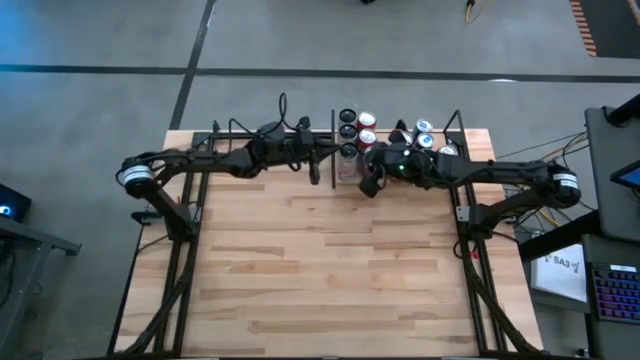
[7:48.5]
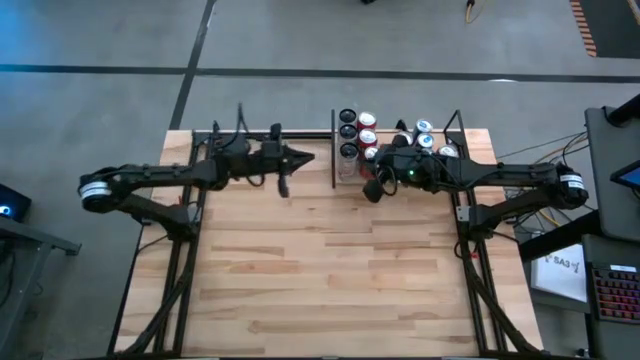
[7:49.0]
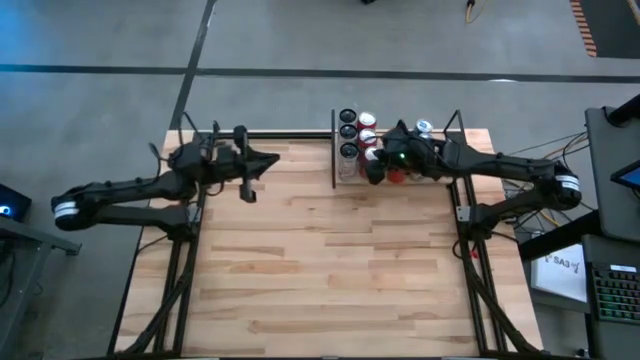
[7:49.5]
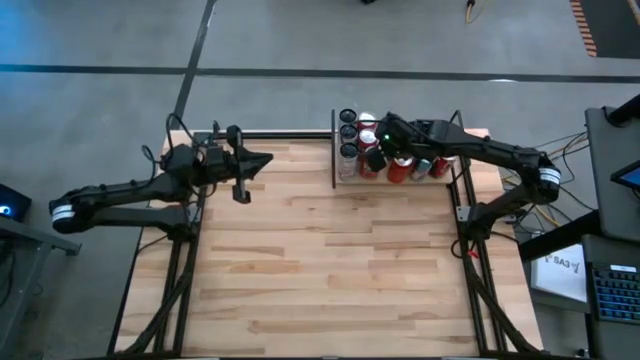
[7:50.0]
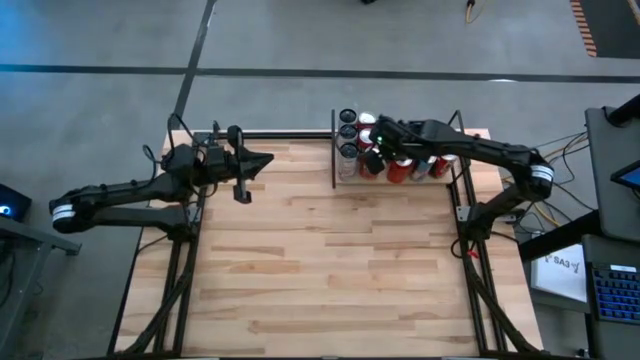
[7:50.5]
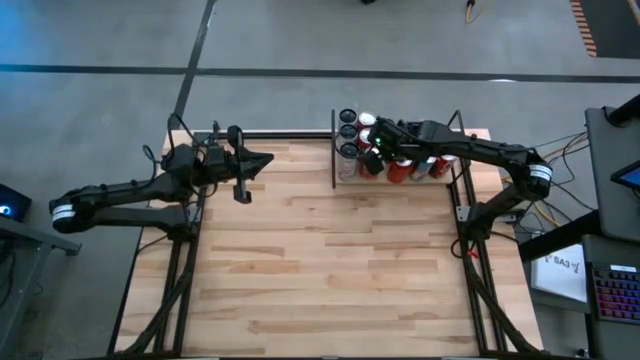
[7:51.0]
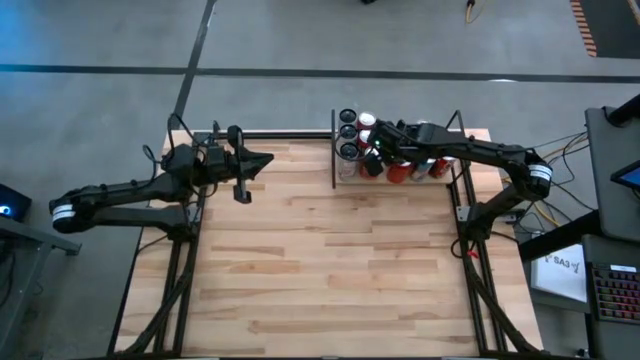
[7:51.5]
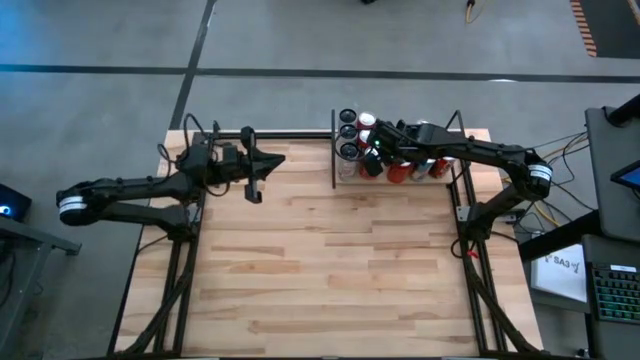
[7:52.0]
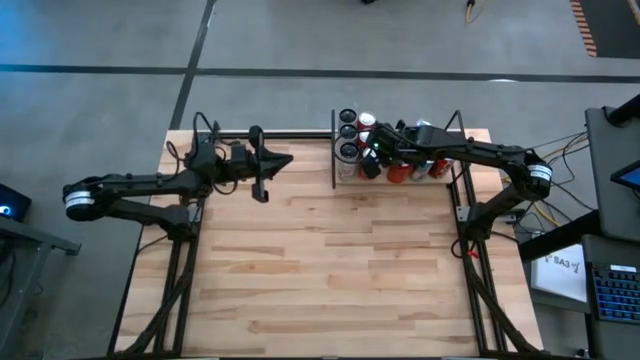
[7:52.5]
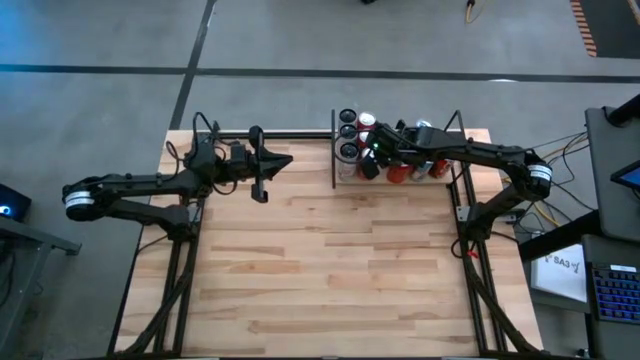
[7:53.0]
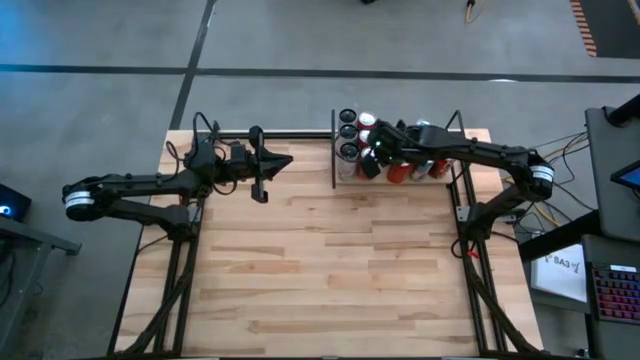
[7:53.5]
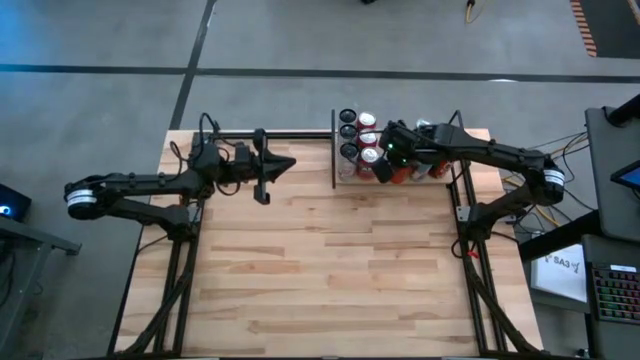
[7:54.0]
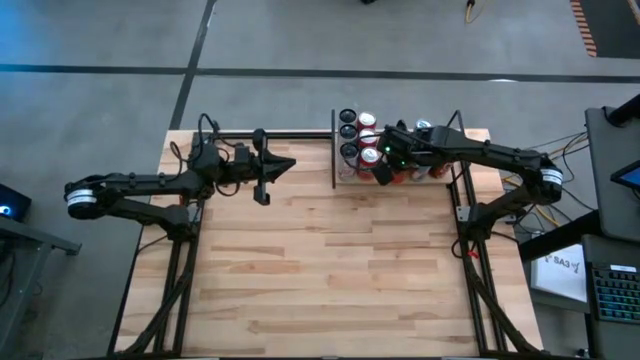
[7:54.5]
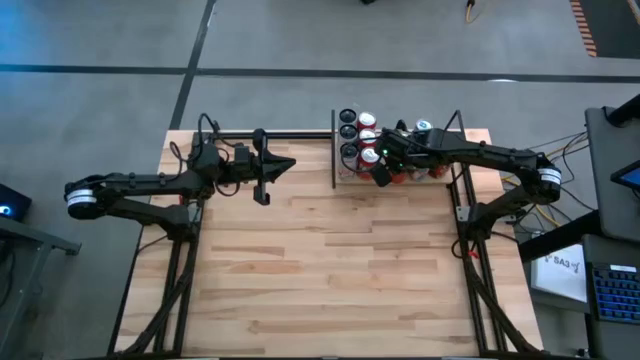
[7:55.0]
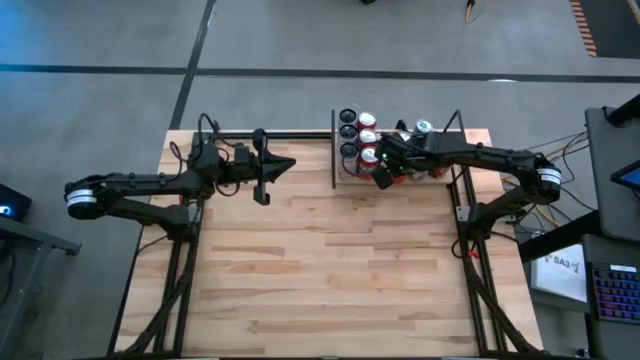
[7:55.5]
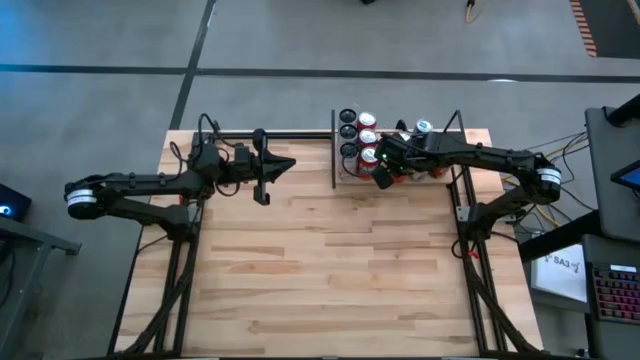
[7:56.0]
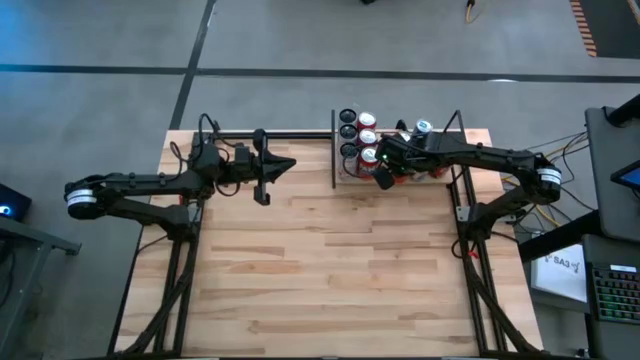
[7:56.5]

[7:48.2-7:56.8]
Task: Place canned beverage on shelf
Adjust the soda cans on the shelf

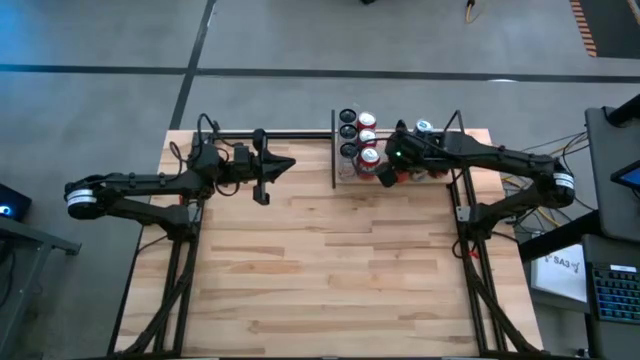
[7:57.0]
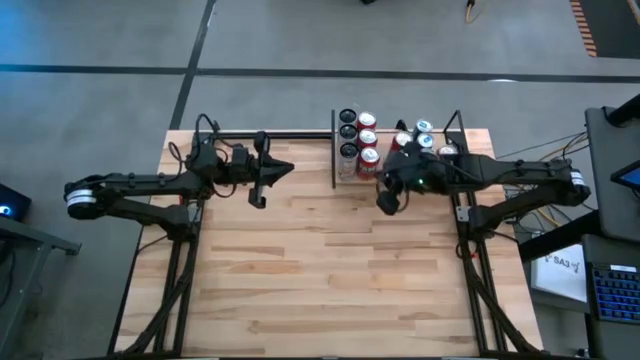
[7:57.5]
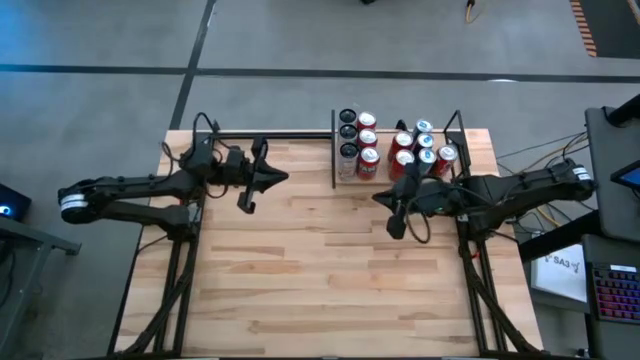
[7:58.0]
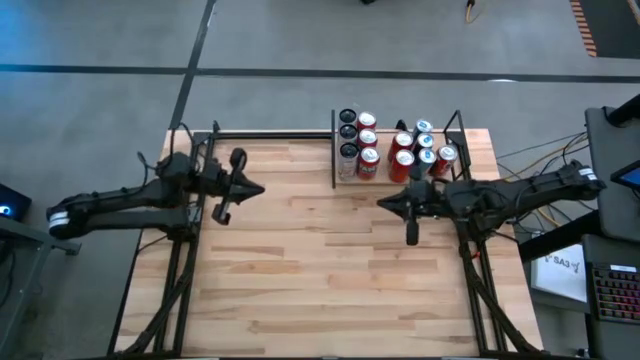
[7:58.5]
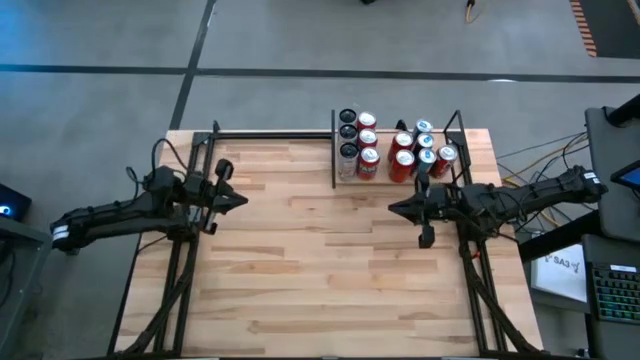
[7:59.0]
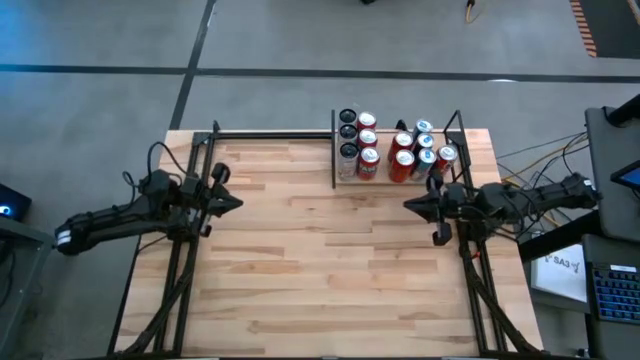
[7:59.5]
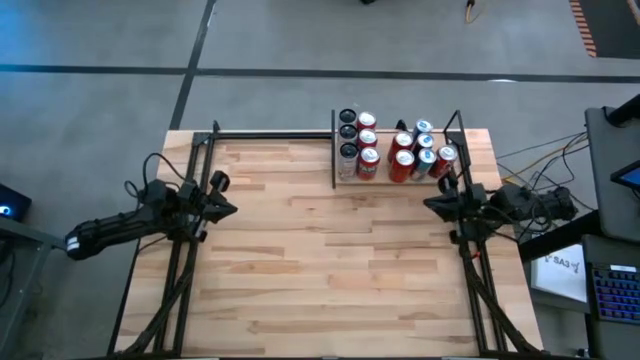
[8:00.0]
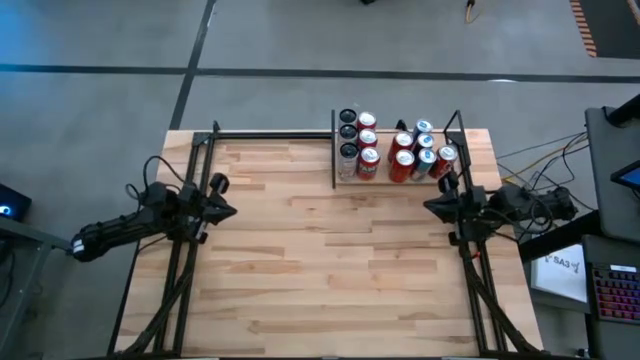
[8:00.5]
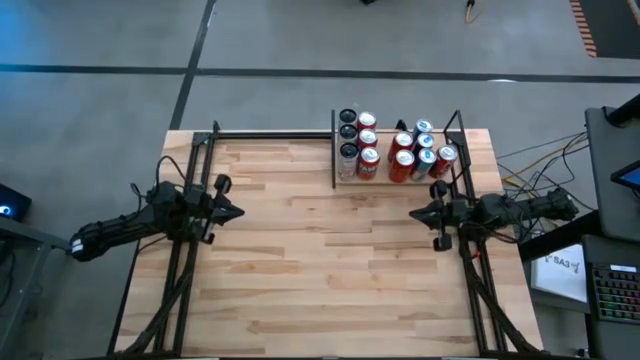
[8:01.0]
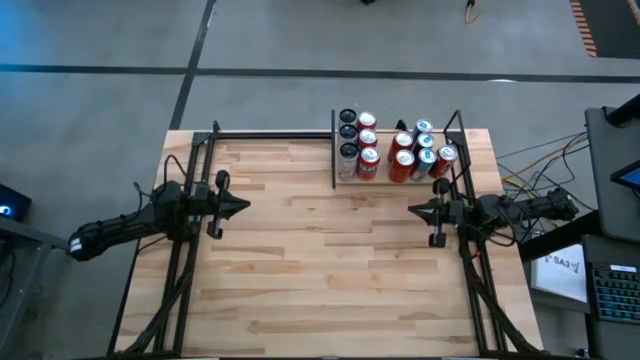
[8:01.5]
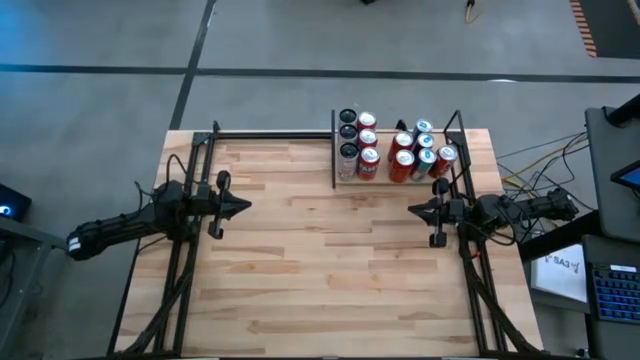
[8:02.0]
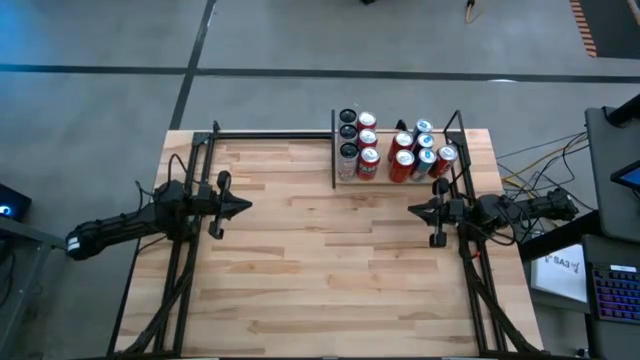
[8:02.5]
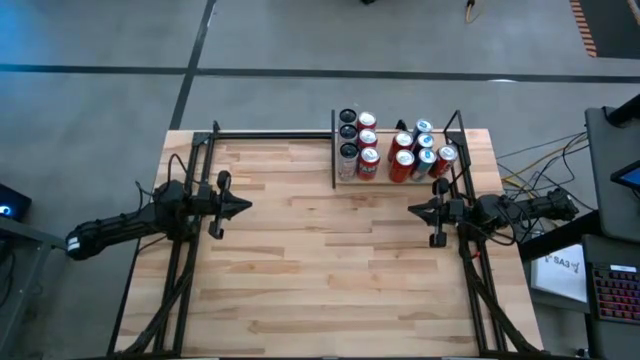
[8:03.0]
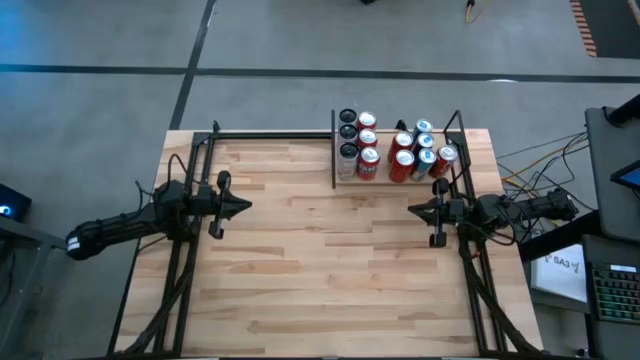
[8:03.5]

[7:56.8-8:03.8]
Return to Home Position

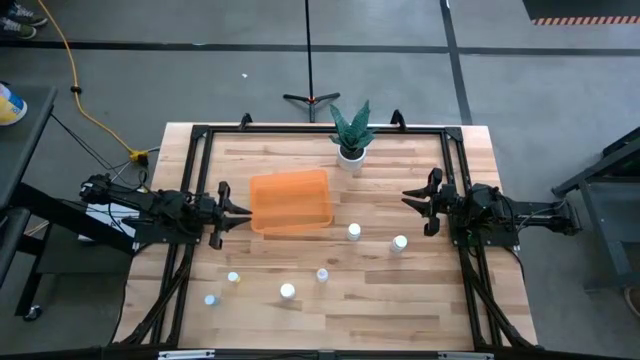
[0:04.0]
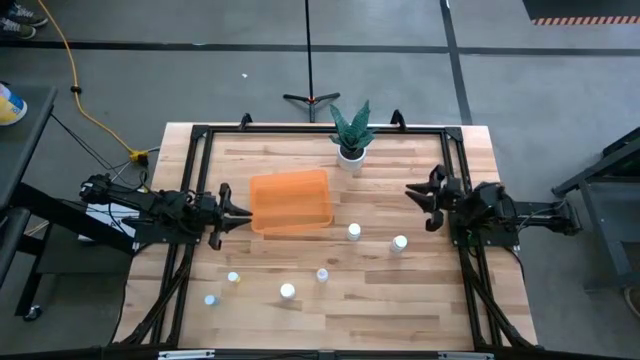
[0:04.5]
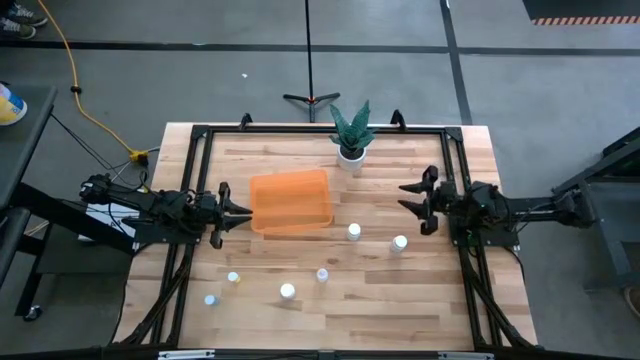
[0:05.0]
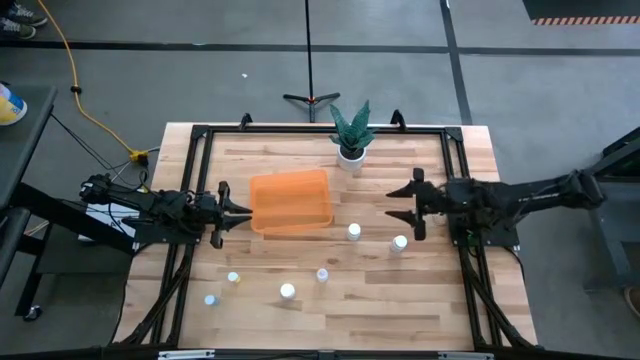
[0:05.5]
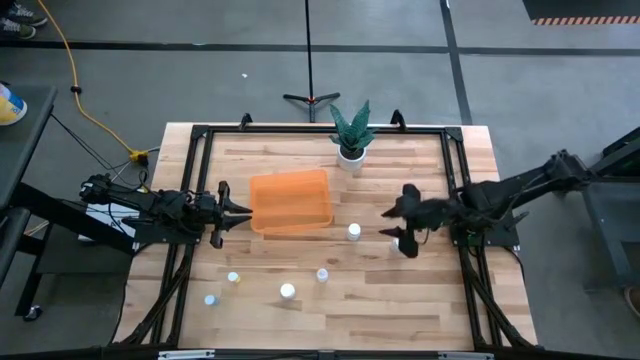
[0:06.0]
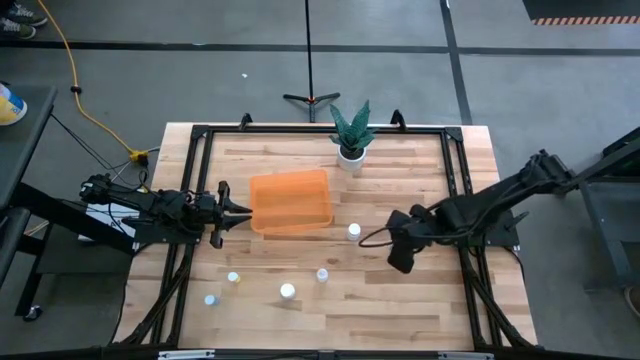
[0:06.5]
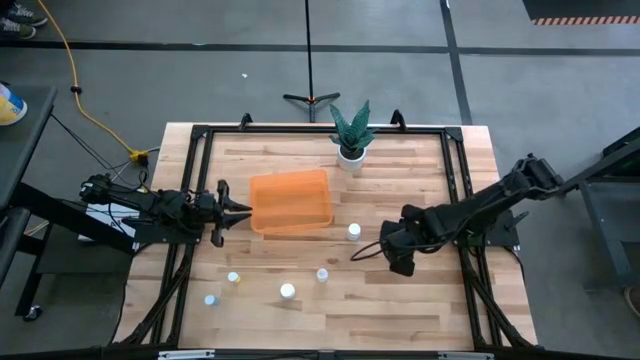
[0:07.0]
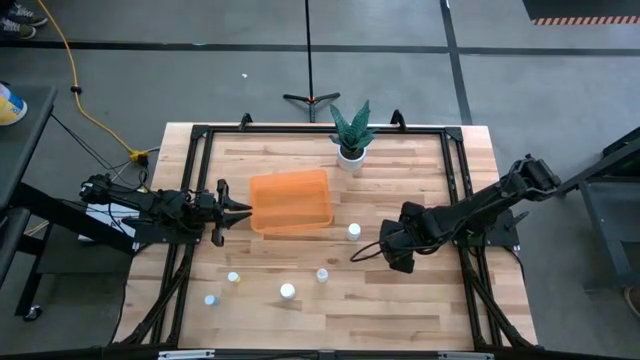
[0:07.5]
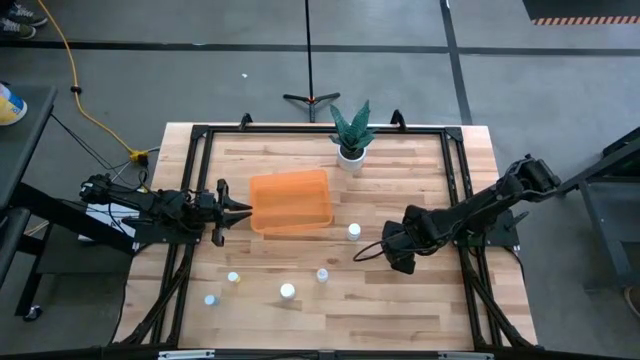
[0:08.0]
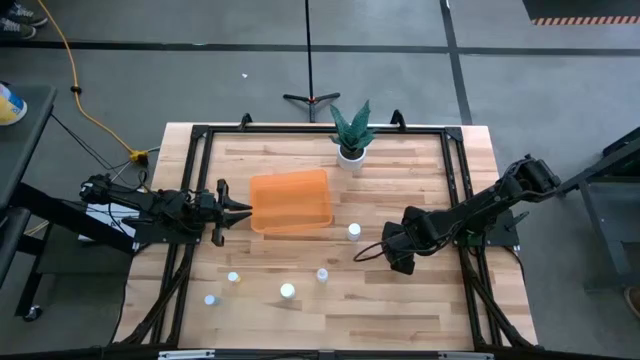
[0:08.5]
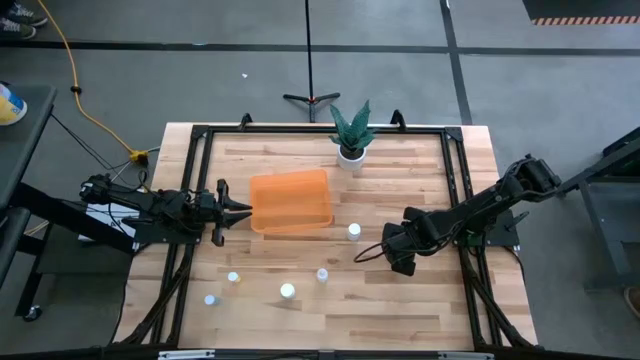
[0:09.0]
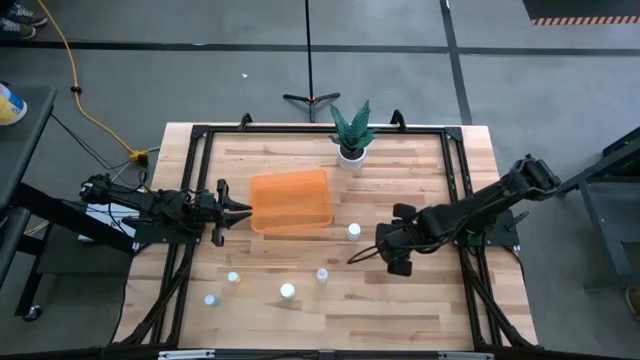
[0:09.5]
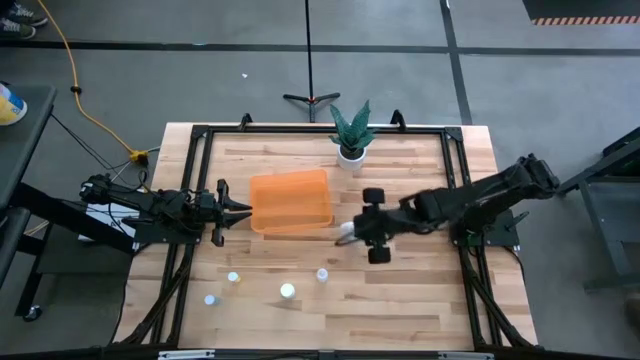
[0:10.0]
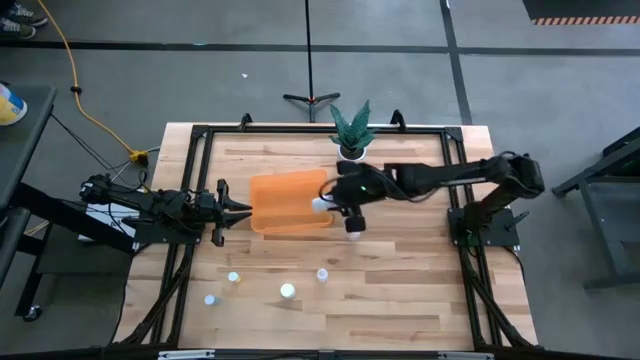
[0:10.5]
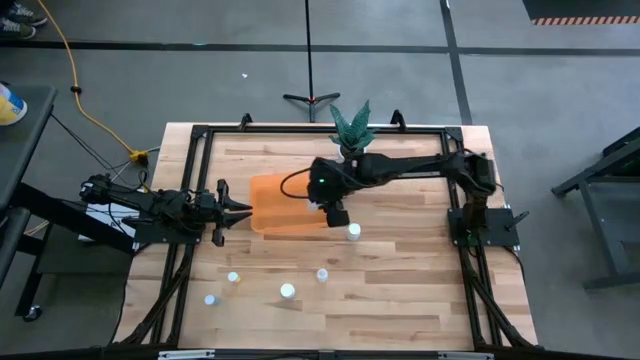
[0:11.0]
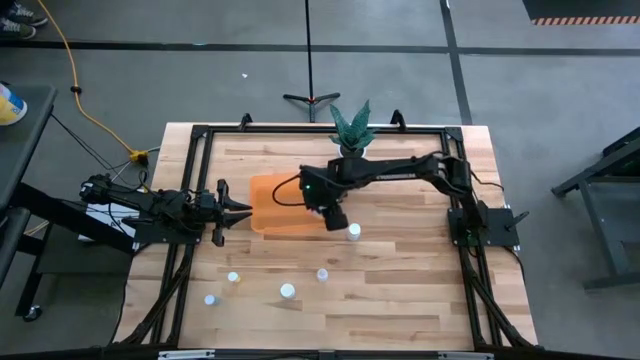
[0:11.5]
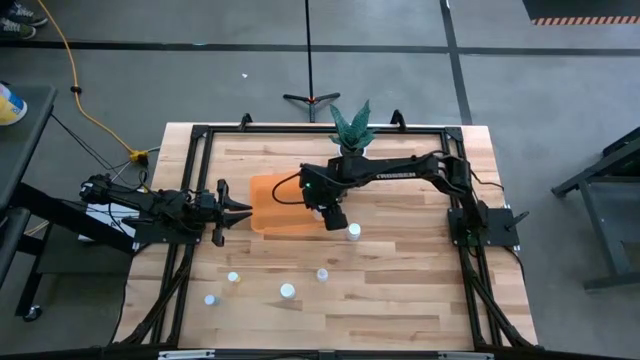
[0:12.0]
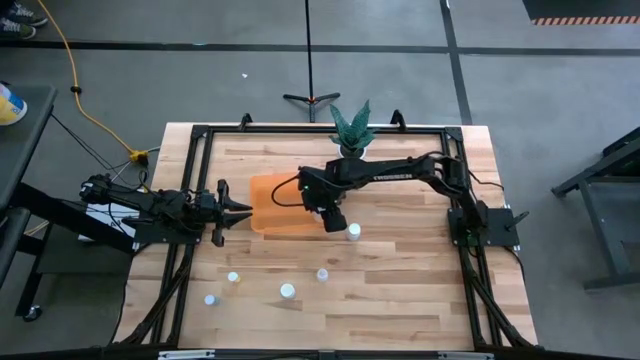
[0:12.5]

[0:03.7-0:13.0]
Task: Pick and place pill bottles into a basket
Put the top right white pill bottle in the orange bin
